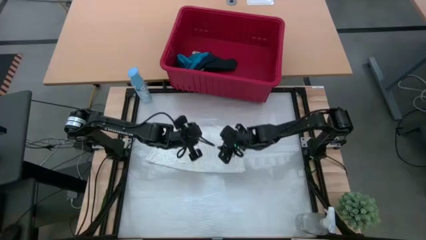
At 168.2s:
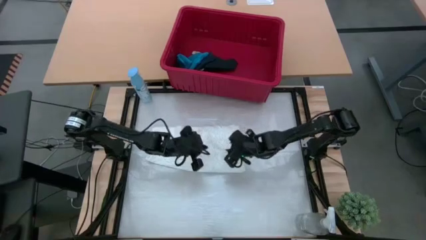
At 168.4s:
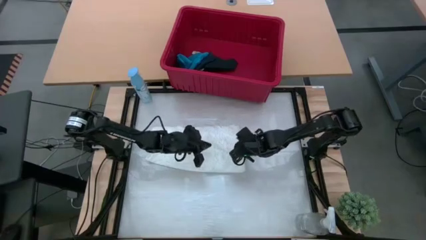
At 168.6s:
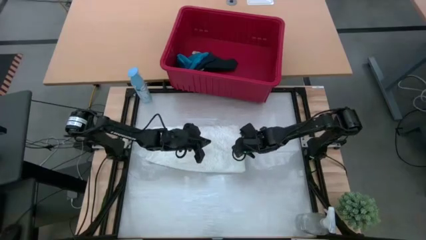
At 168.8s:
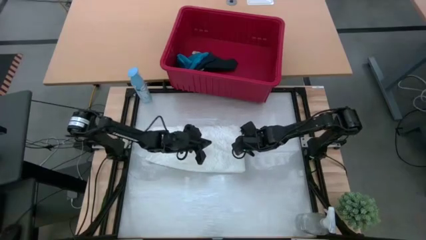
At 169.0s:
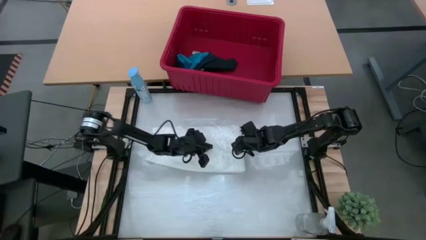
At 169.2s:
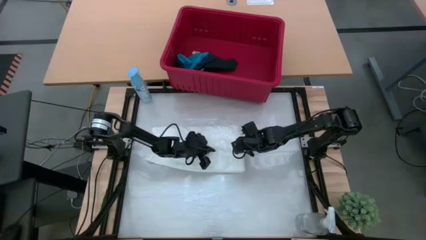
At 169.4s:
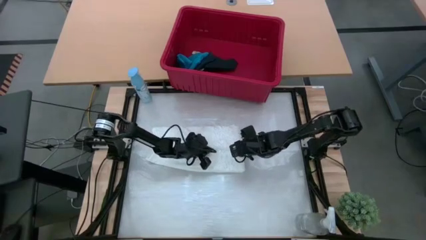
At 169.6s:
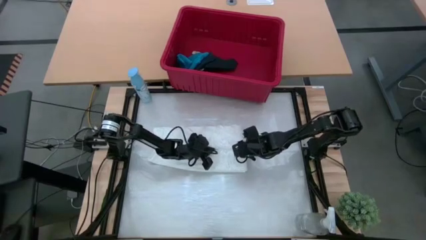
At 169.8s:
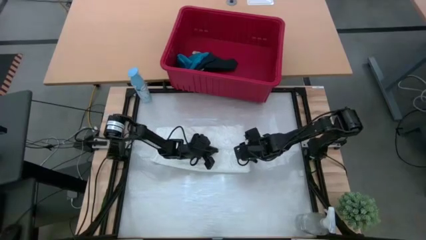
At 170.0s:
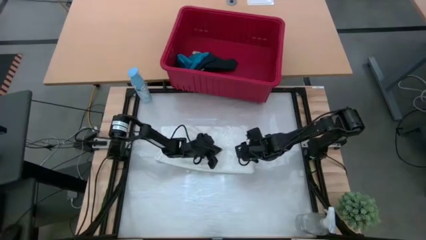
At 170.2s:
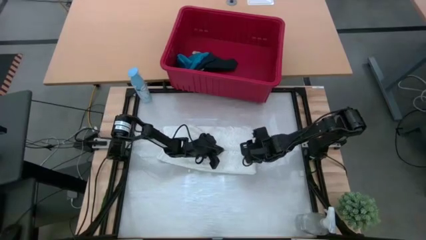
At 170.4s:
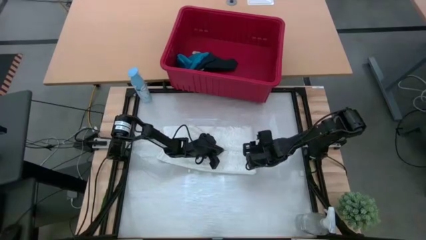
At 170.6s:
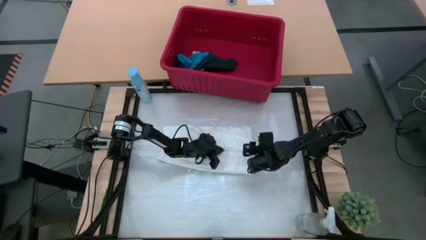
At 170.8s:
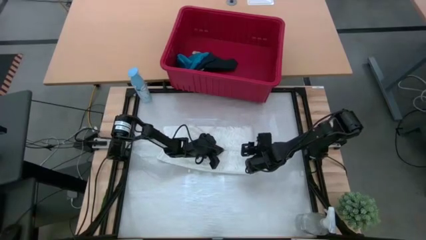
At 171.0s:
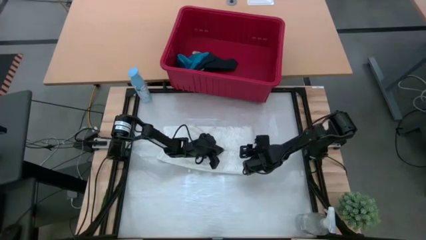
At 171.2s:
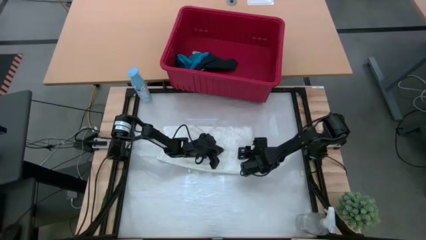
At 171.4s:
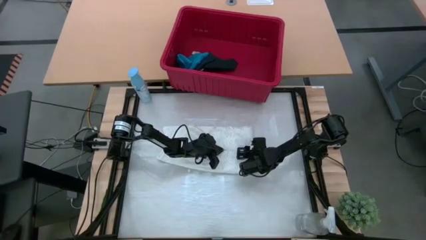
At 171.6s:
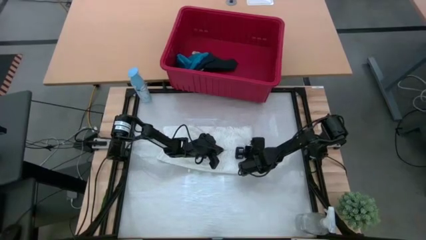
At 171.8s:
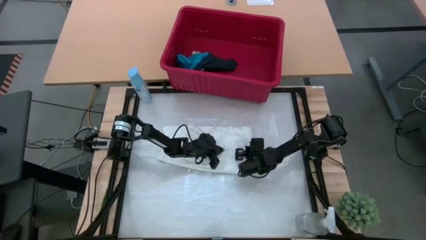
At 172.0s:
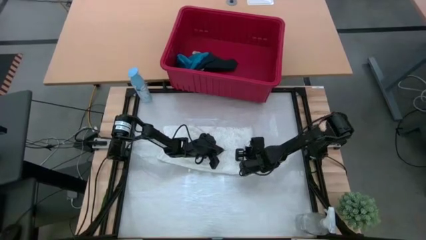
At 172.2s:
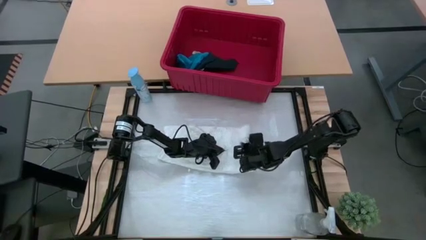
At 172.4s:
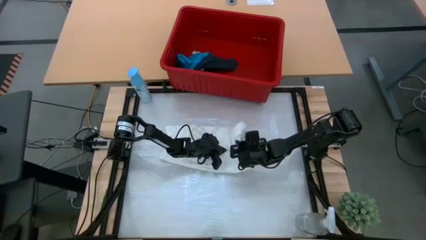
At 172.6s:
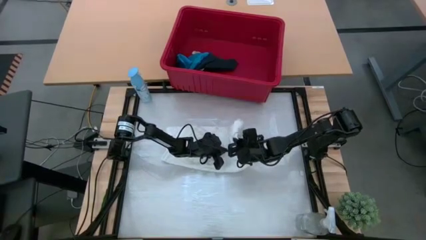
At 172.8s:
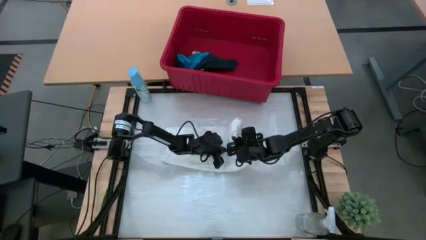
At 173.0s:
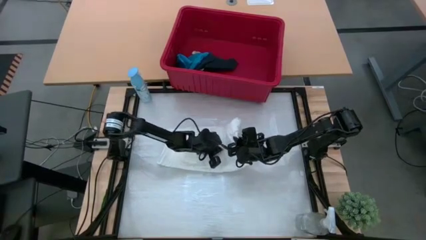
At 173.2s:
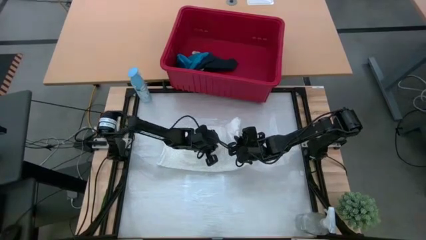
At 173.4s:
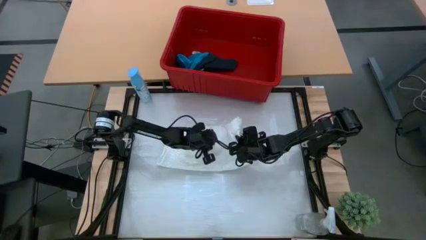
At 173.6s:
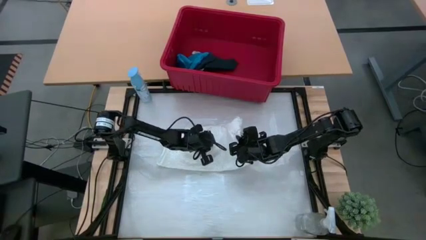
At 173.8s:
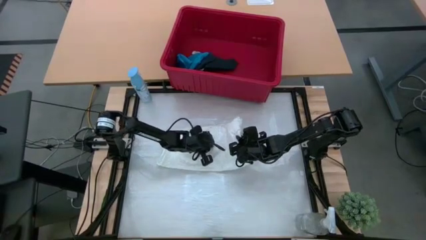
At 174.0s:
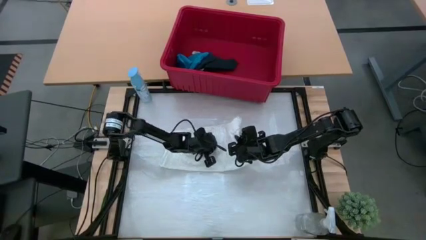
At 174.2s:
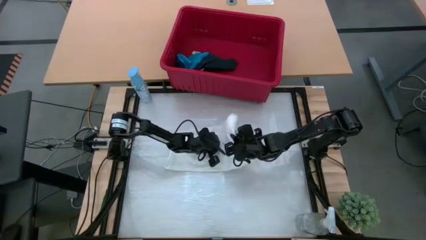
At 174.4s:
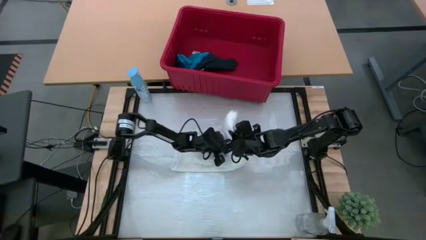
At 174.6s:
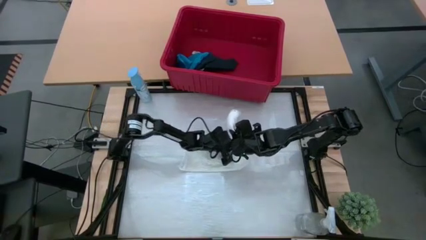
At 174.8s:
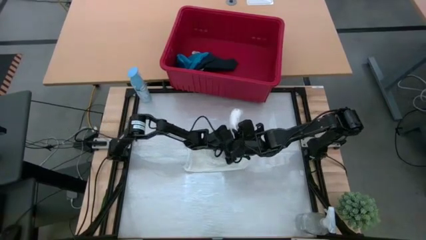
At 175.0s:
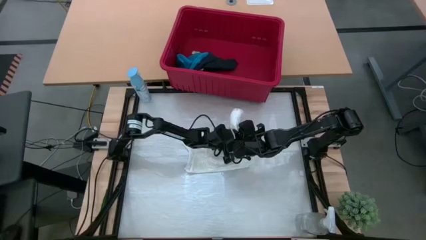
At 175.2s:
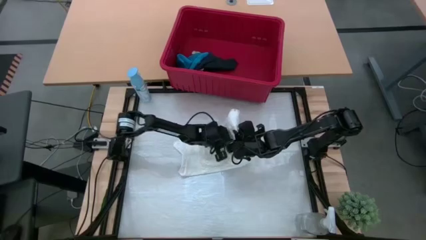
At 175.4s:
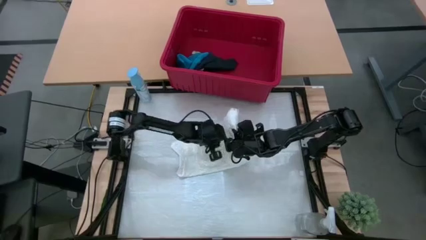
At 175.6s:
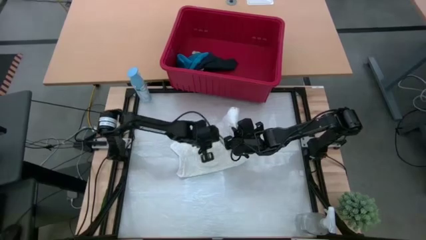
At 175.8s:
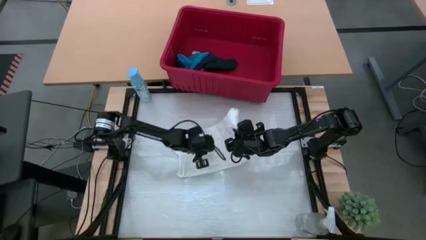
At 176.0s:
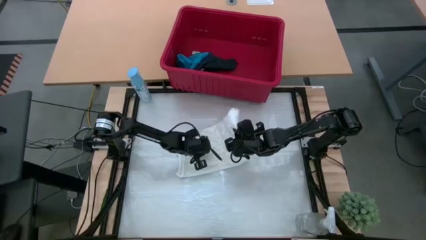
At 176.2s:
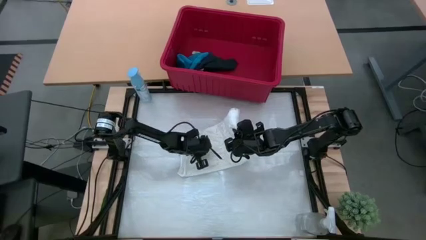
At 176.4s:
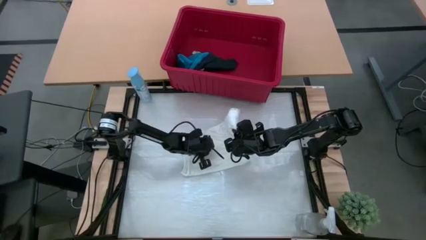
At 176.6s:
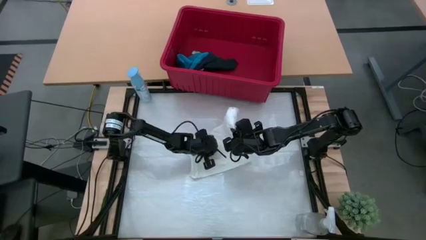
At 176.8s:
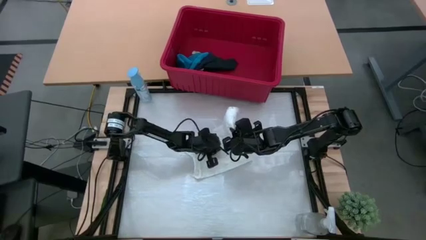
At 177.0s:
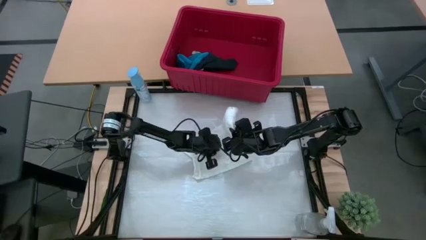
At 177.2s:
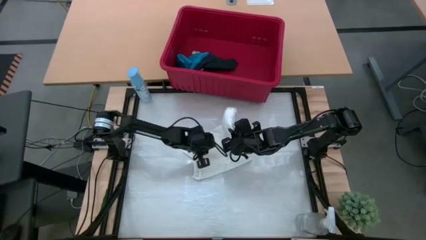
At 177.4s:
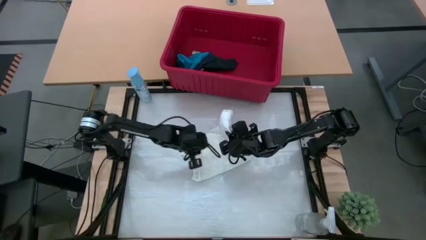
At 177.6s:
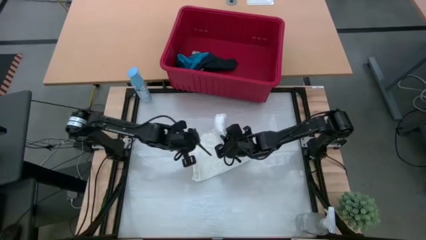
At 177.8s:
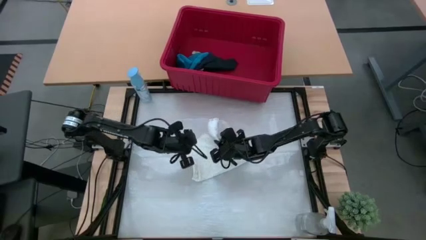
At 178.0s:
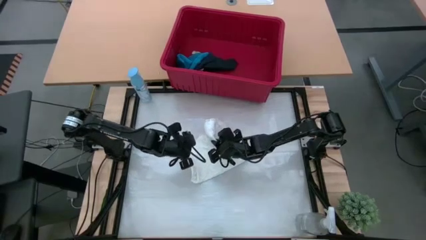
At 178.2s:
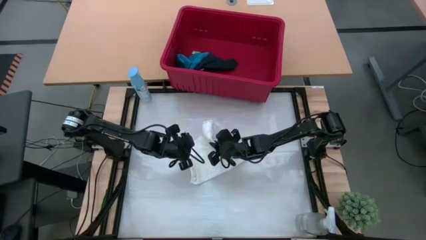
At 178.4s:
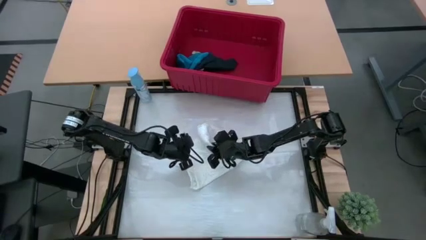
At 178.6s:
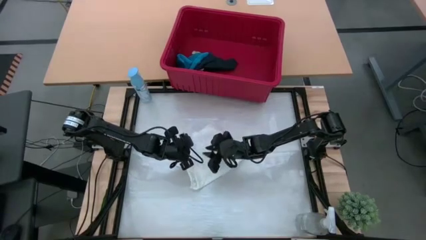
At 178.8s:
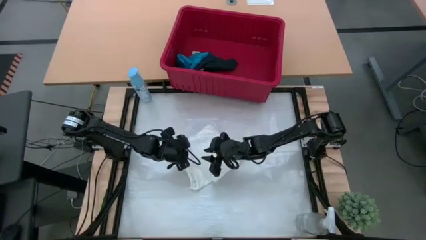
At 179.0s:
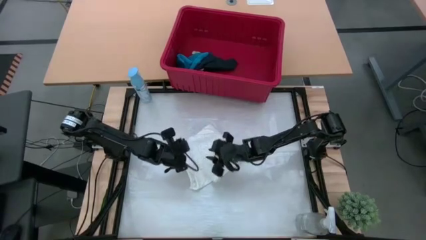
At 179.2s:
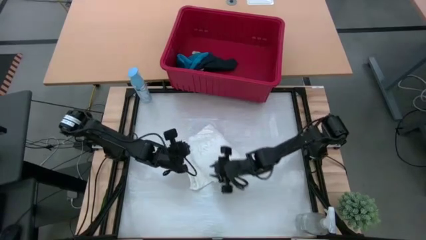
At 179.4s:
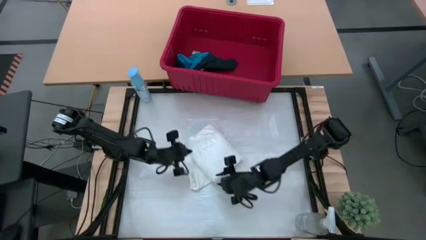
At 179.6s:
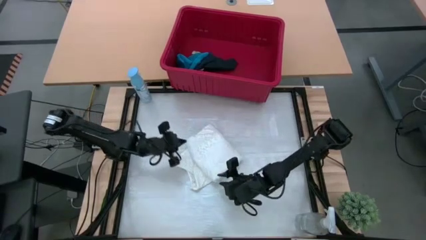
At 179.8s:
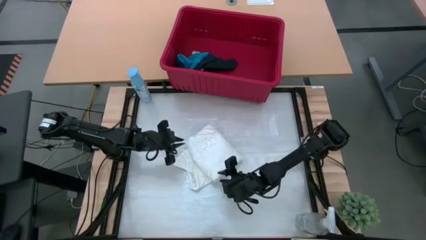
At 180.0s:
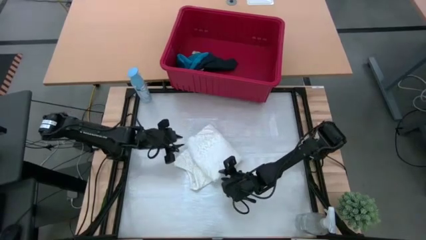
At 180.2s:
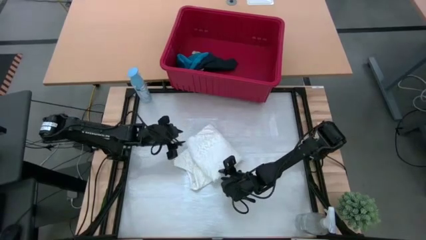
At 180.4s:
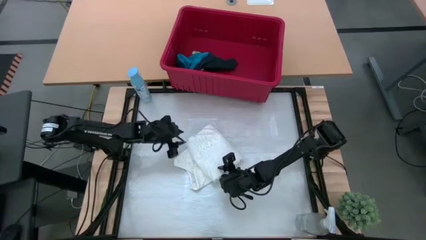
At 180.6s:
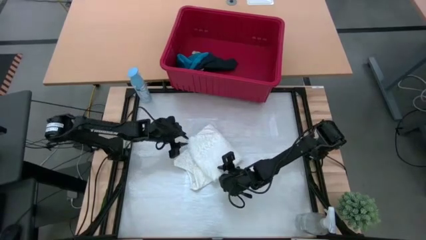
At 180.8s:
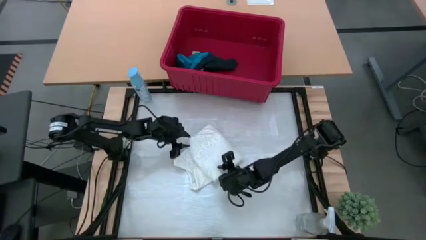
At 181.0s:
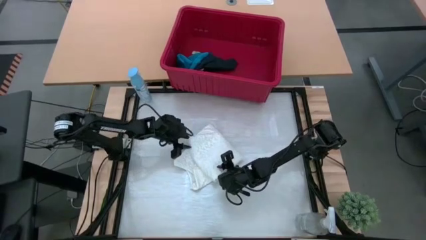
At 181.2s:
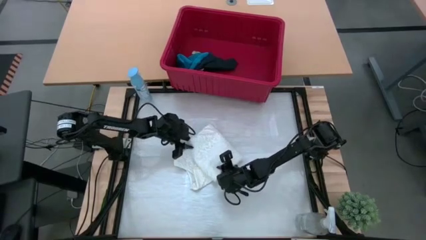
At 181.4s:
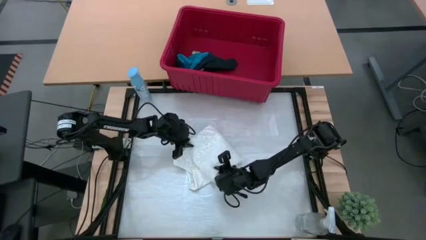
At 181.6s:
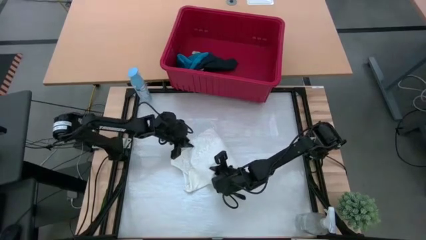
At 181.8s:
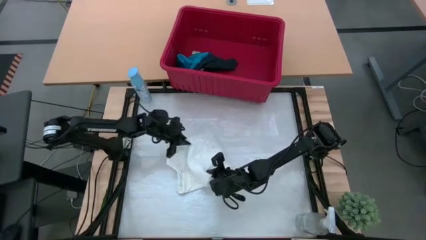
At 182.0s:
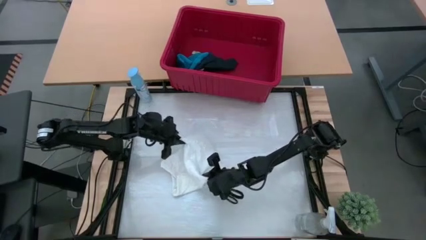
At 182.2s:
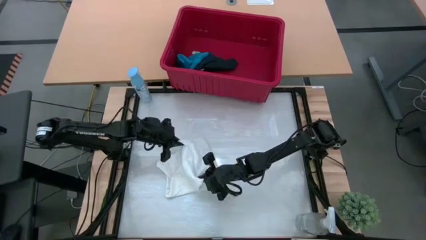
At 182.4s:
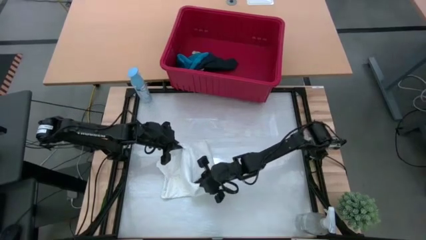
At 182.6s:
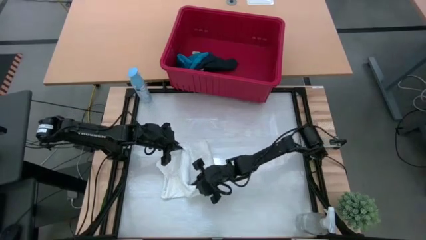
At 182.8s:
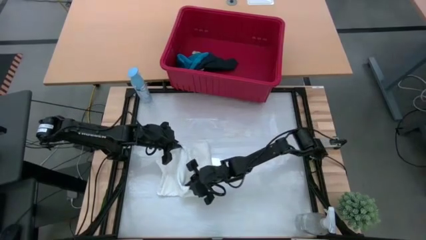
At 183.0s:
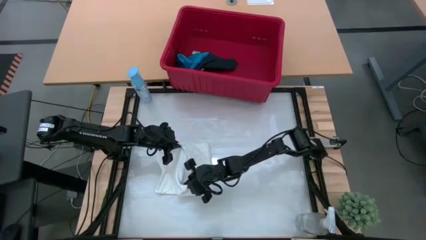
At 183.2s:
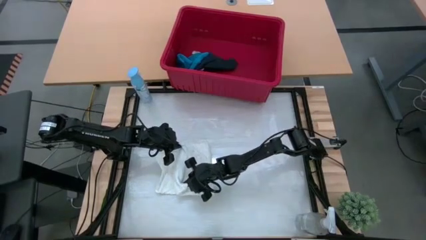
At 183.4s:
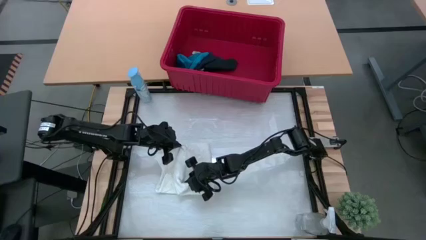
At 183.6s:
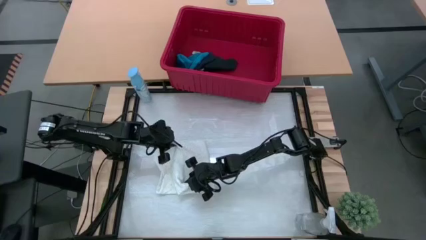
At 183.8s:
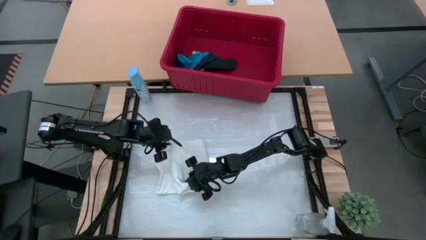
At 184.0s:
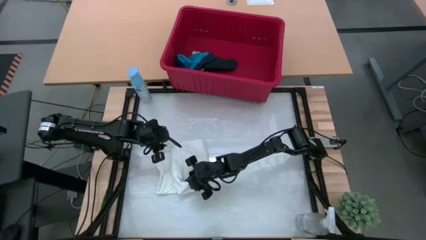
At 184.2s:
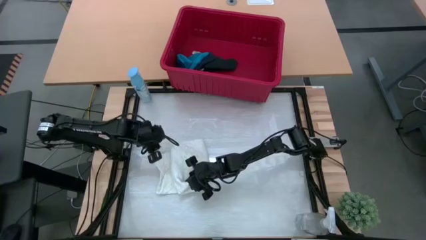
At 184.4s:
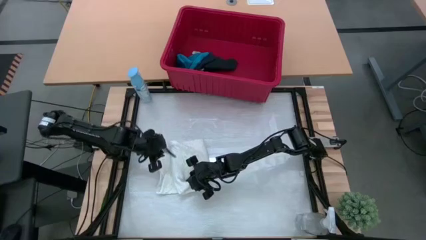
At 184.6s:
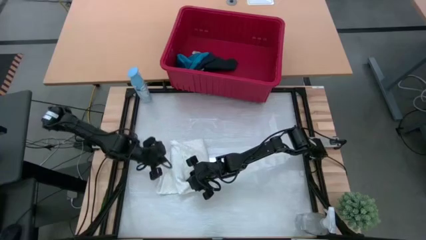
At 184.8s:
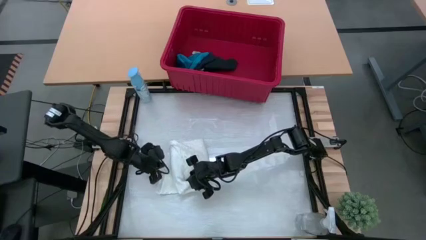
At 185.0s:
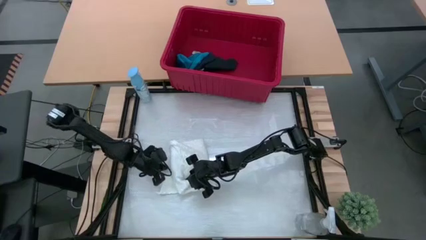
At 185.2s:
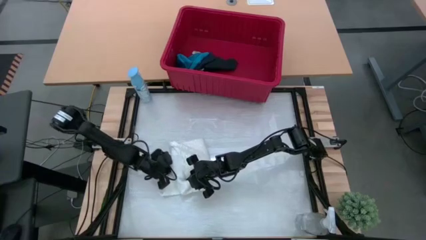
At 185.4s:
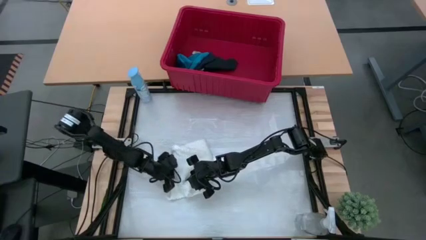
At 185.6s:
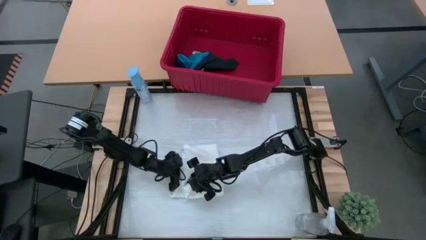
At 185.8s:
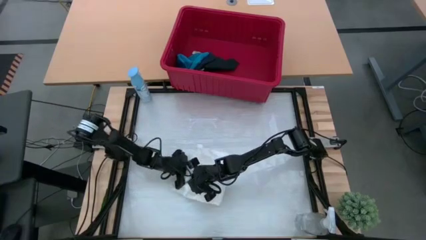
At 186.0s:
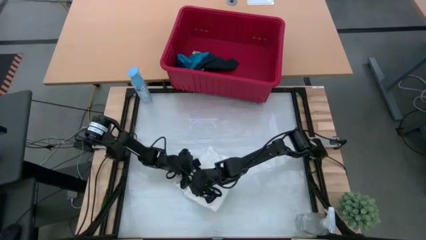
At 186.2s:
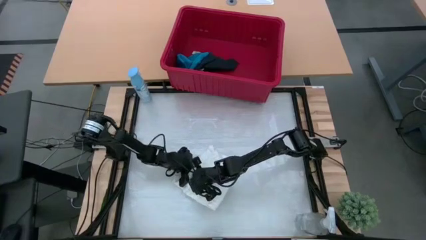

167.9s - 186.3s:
Task: Fold Laundry from Bin
Fold the white shirt
